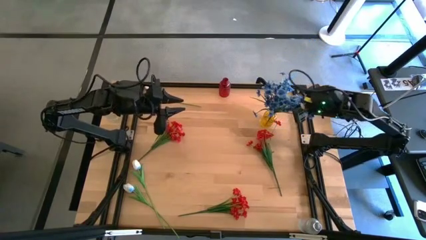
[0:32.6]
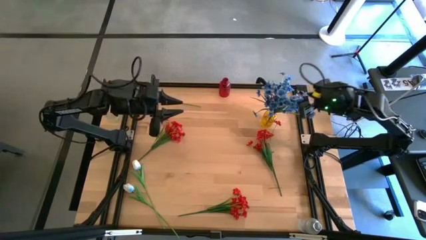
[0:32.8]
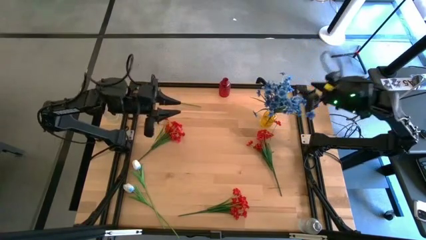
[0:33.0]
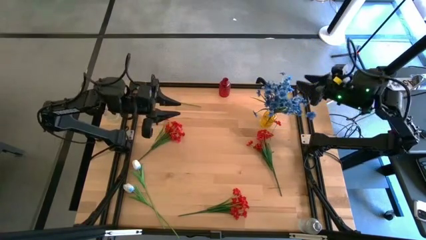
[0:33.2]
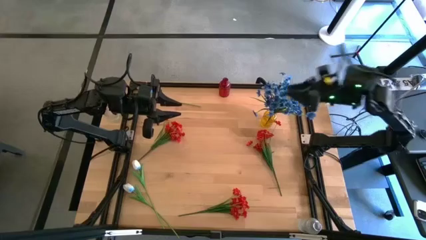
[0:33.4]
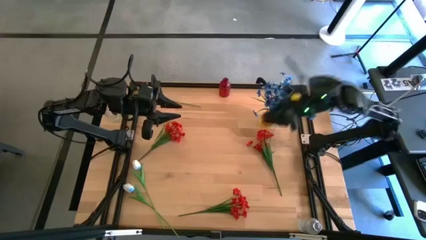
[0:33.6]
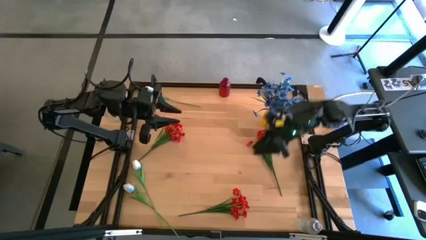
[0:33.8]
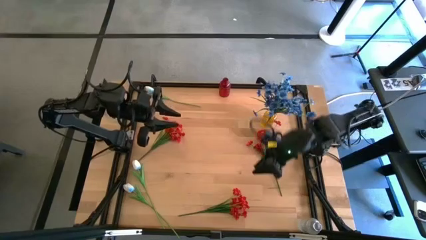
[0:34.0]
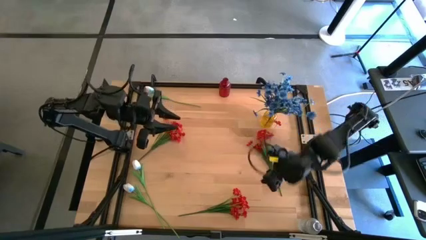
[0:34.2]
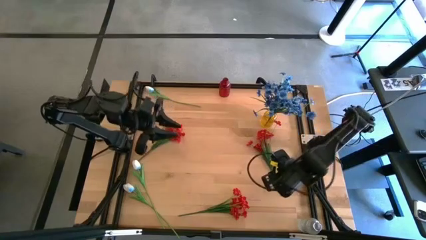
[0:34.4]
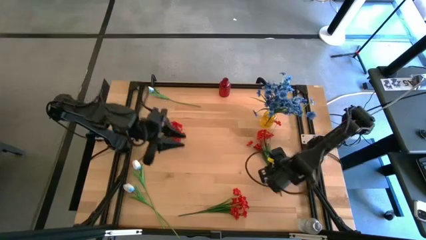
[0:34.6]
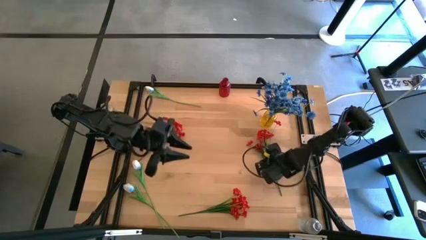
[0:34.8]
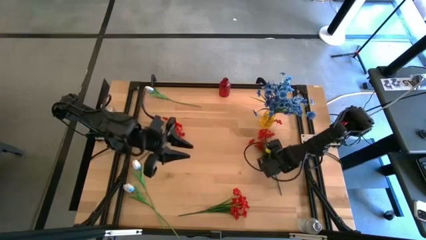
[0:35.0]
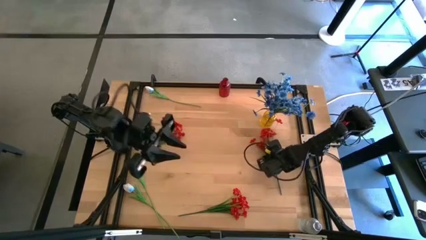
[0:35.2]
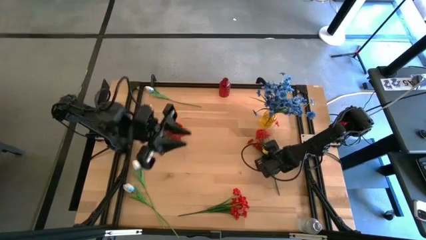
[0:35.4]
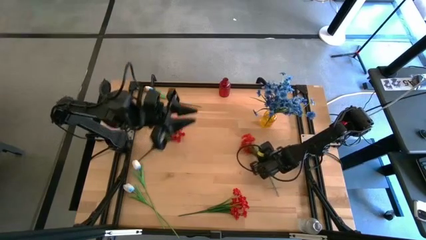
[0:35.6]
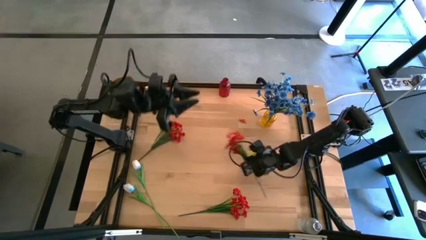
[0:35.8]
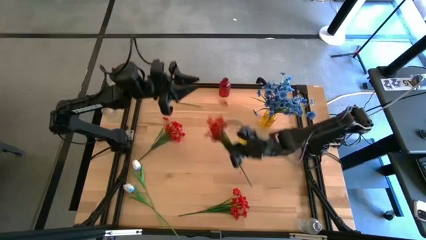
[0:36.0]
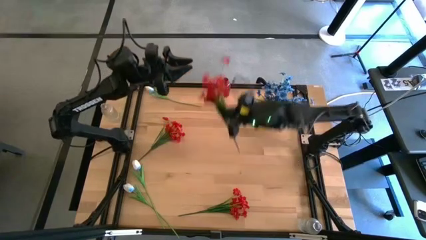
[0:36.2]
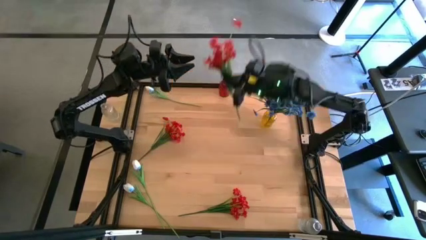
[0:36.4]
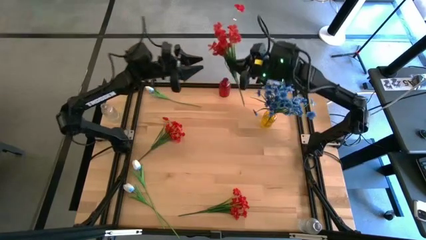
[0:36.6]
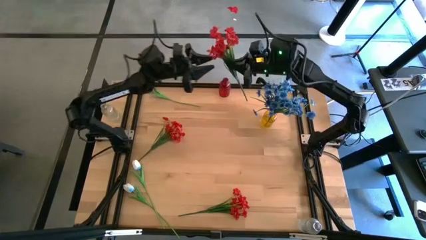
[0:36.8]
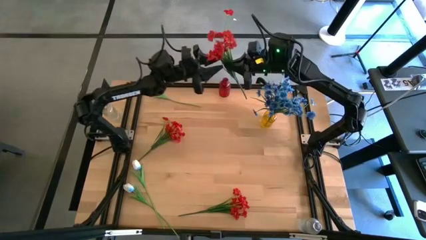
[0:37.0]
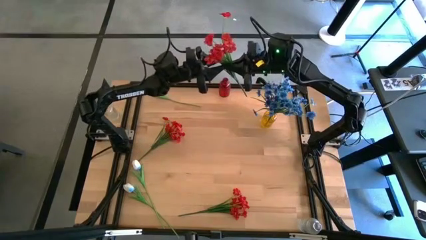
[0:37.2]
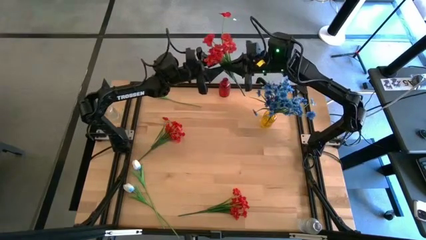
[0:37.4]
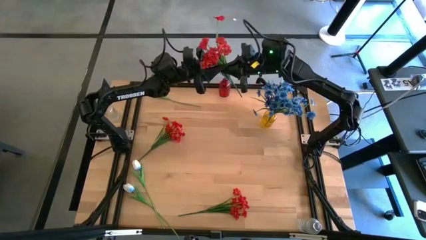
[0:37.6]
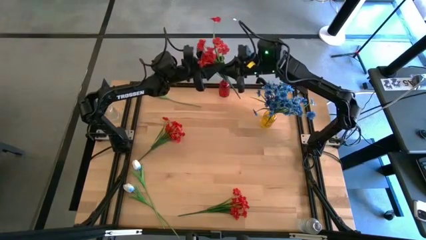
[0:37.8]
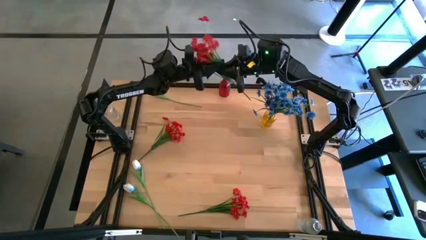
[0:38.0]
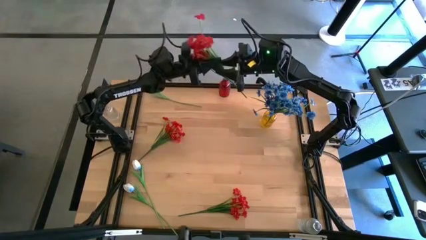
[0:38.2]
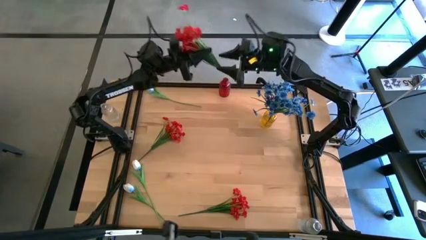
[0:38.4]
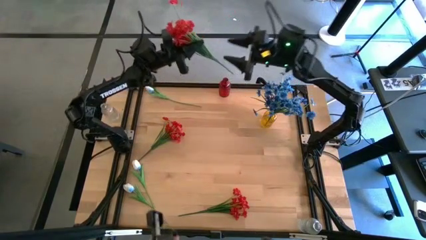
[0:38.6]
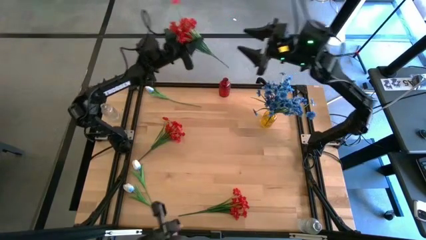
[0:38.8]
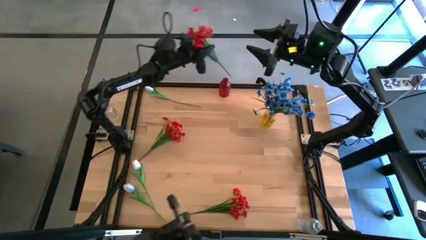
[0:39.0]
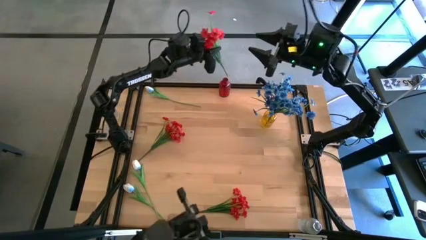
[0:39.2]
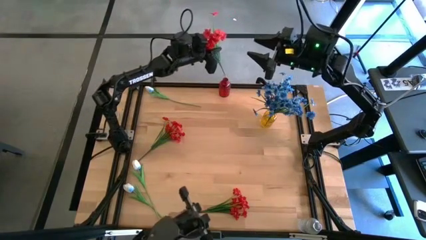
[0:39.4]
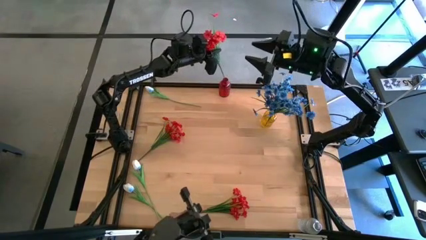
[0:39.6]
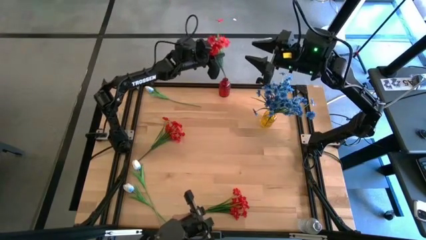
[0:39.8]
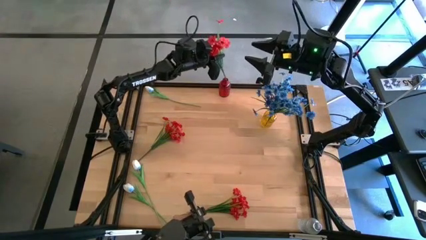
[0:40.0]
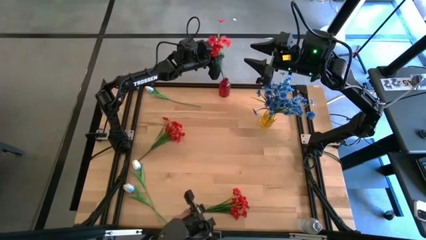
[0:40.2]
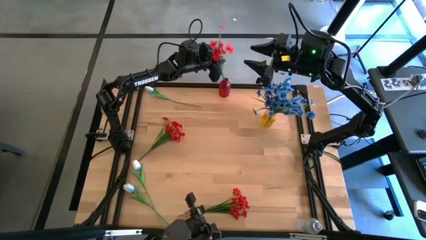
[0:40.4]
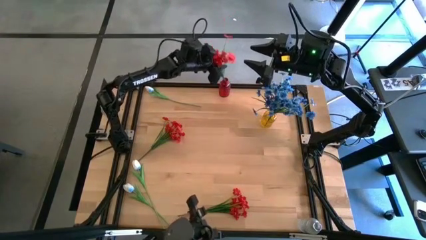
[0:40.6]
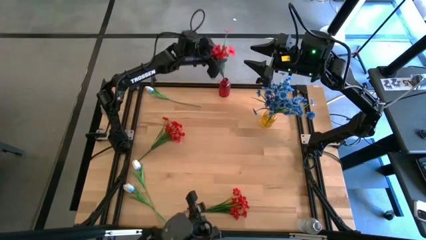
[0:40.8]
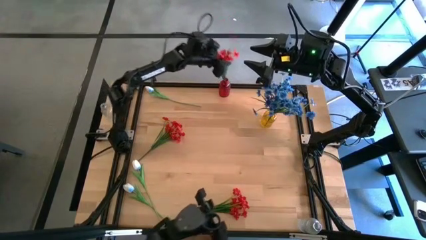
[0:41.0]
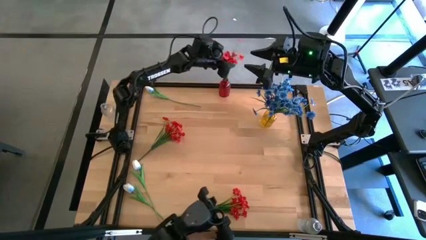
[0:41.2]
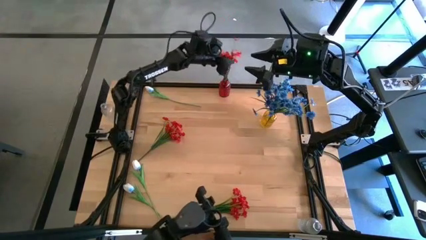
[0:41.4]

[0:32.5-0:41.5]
Task: Sort flowers into vase by color
Put the top right red flowers into the red vase

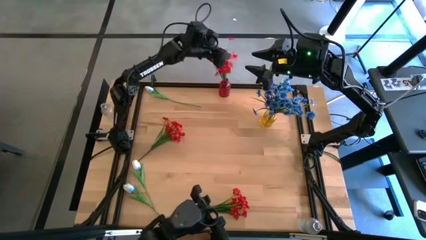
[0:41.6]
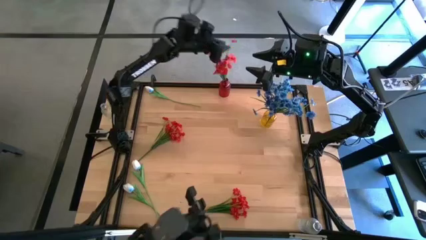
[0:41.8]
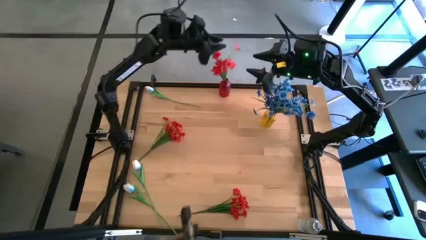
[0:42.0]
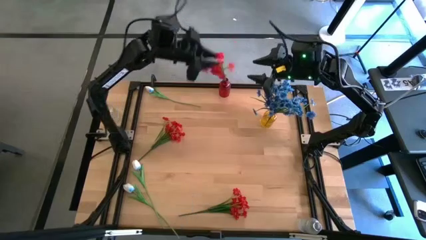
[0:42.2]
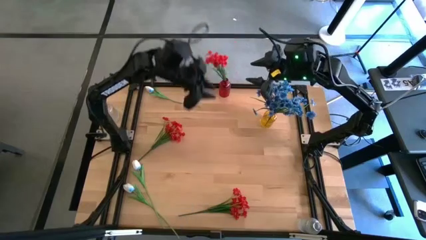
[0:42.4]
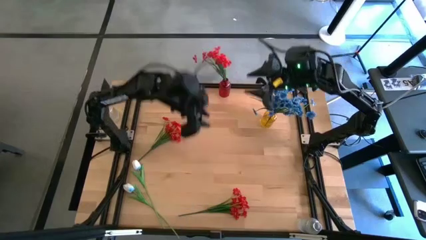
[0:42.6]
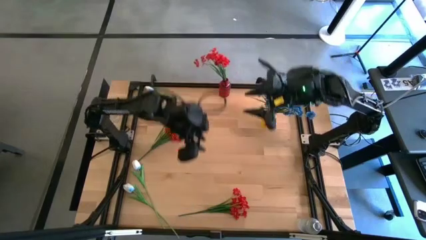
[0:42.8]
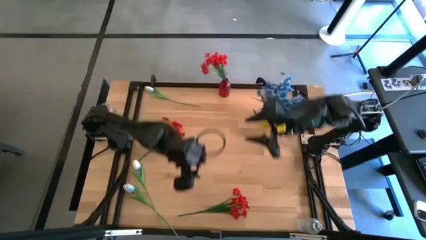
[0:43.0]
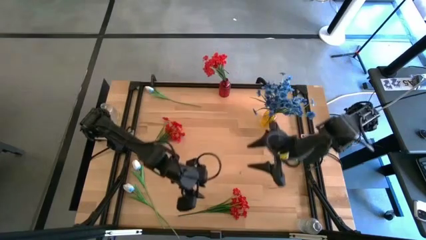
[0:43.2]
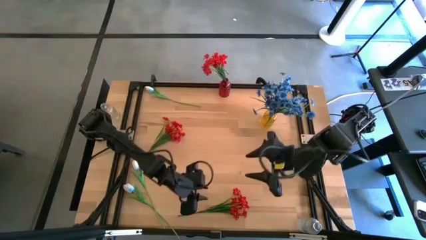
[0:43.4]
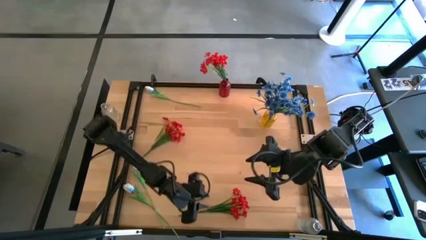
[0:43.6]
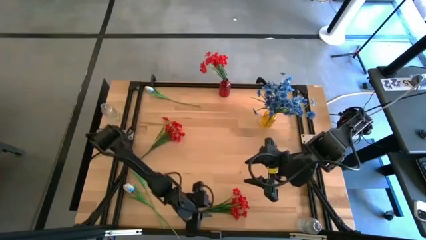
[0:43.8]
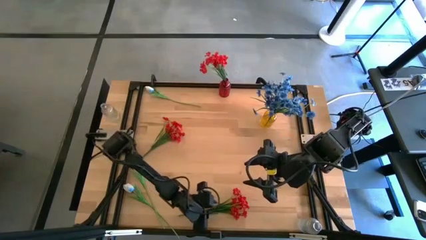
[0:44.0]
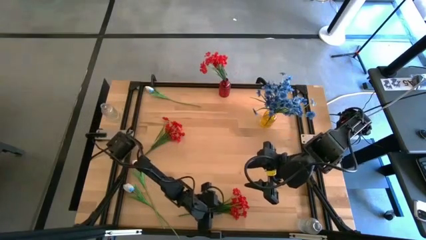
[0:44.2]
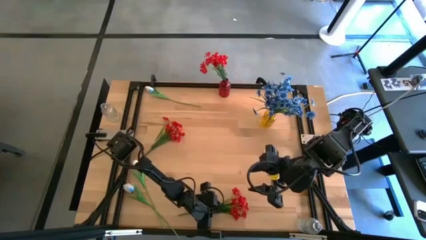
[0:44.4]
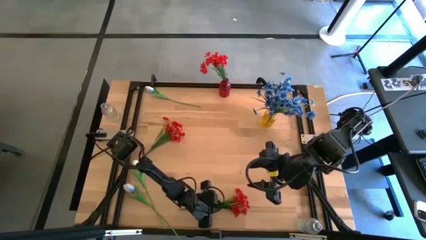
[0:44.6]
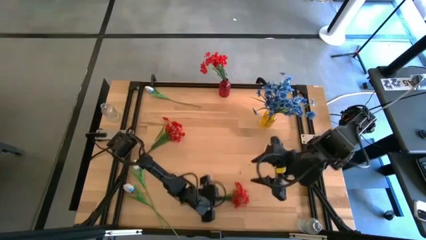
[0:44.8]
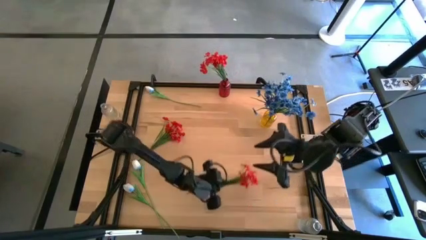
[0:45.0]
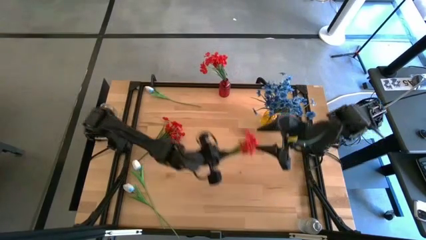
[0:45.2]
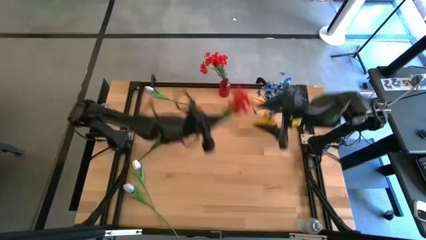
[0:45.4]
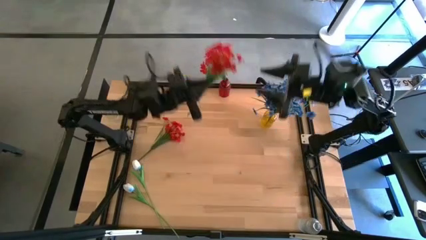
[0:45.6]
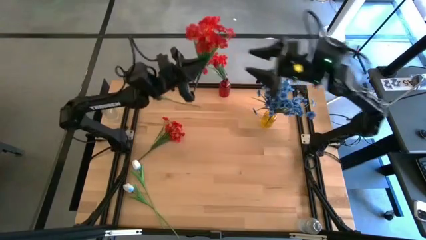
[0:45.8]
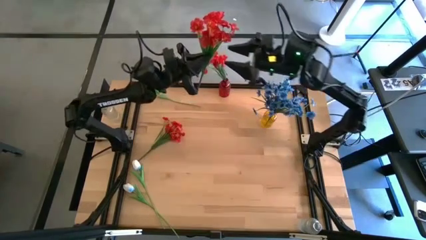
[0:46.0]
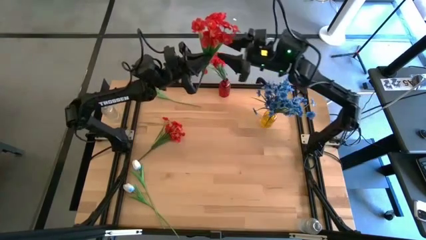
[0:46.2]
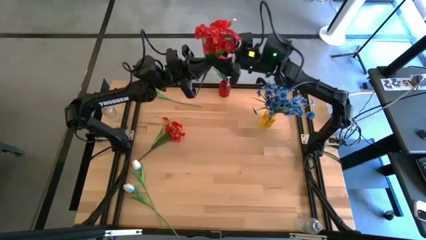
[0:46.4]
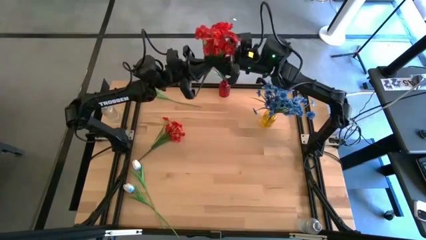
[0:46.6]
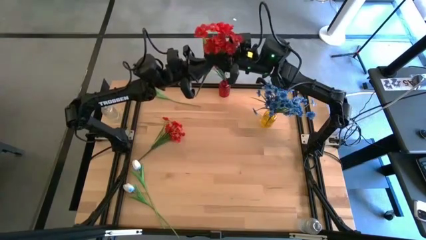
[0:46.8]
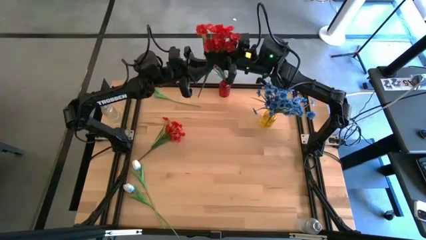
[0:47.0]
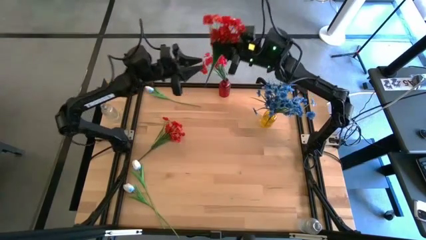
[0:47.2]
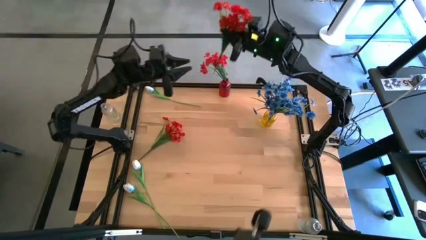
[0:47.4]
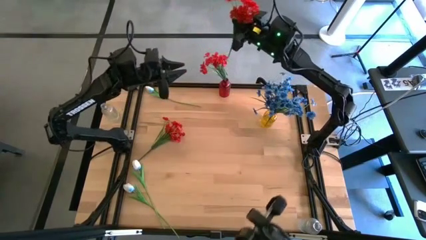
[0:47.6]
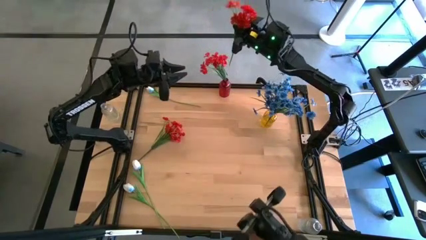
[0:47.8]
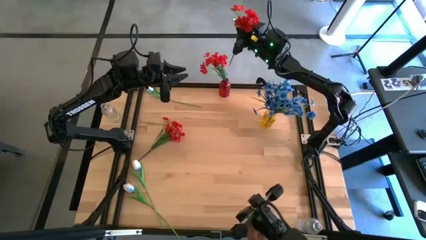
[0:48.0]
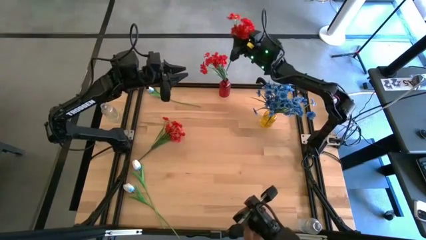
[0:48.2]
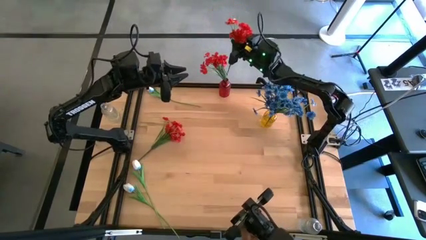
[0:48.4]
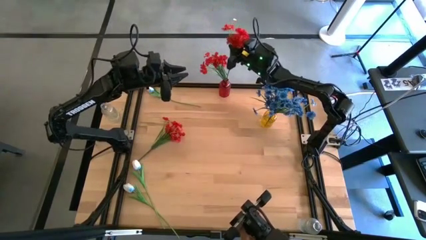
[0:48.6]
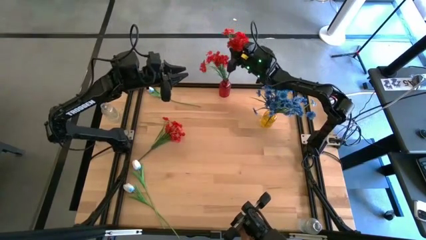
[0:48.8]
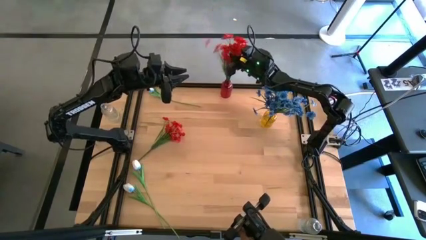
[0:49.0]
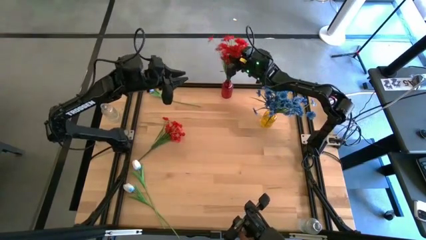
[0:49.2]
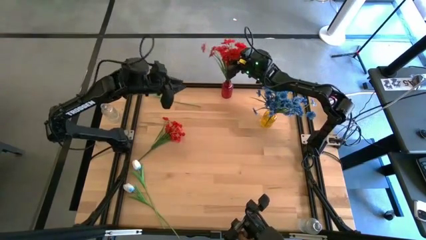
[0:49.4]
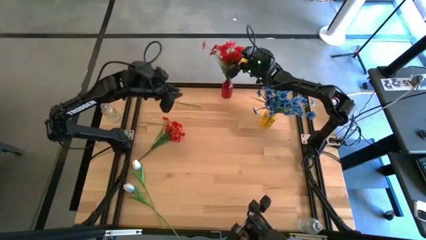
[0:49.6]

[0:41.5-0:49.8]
Put the bottom red flowers into the red vase
